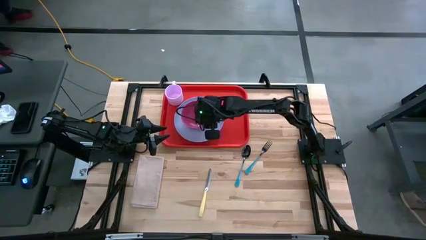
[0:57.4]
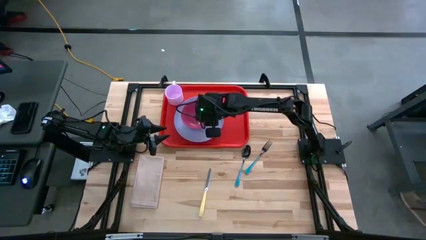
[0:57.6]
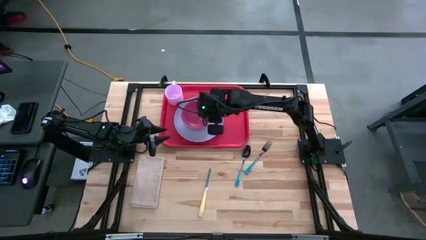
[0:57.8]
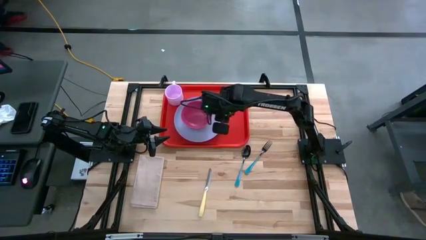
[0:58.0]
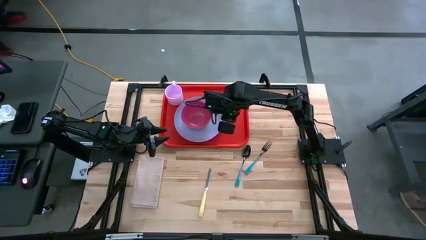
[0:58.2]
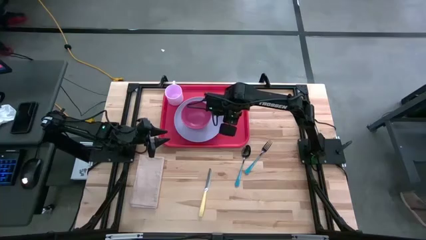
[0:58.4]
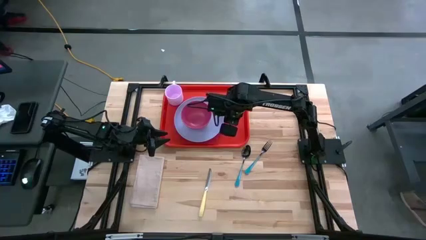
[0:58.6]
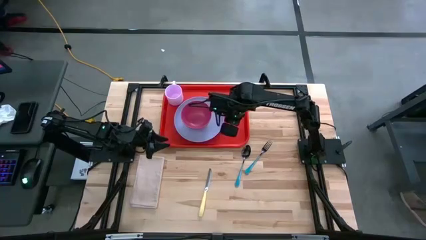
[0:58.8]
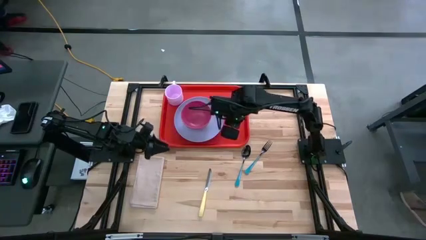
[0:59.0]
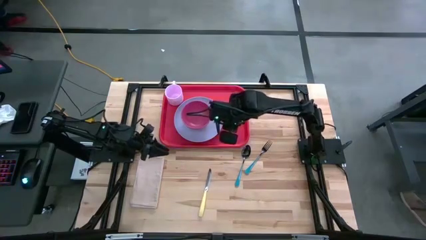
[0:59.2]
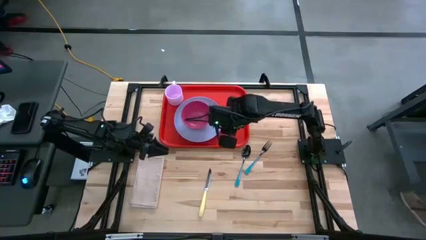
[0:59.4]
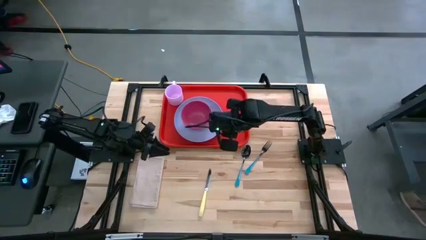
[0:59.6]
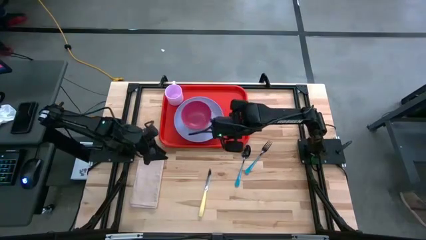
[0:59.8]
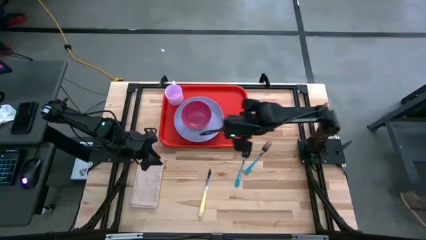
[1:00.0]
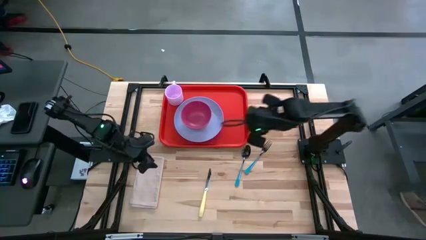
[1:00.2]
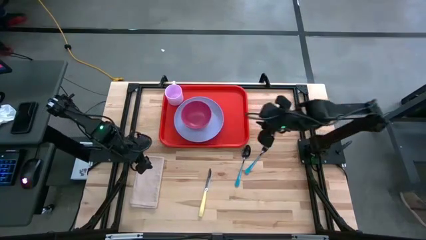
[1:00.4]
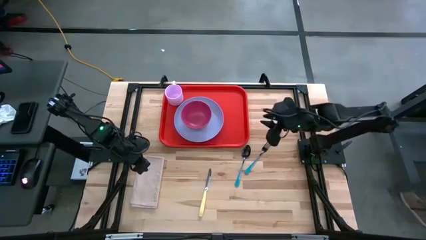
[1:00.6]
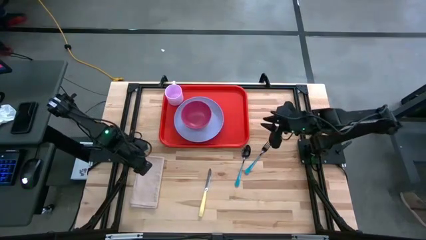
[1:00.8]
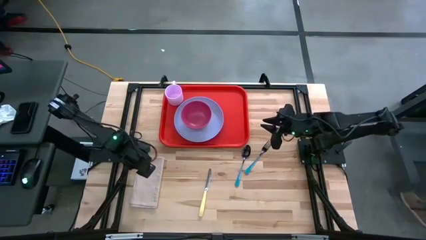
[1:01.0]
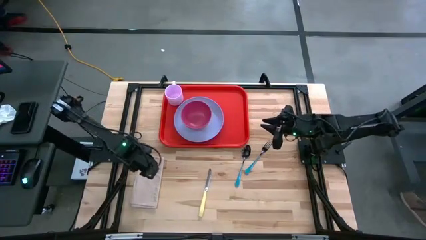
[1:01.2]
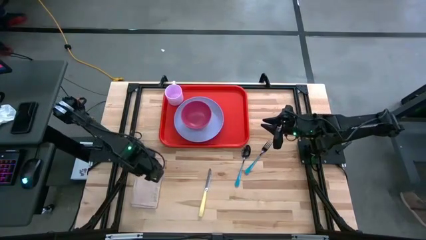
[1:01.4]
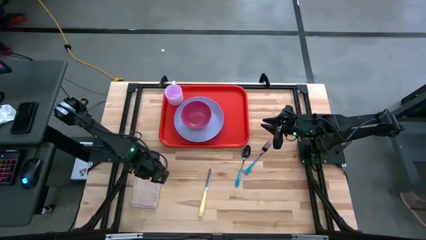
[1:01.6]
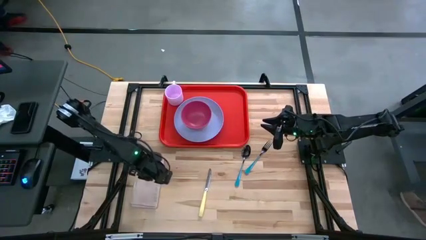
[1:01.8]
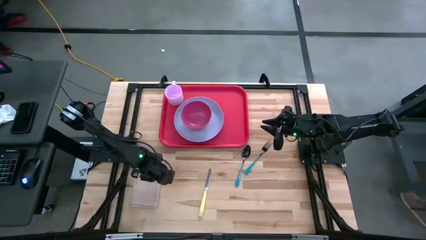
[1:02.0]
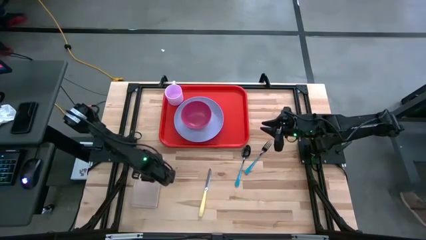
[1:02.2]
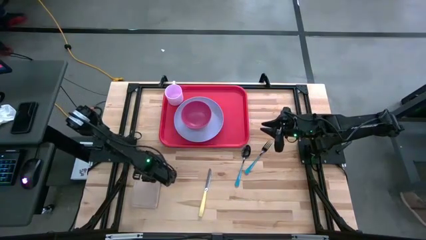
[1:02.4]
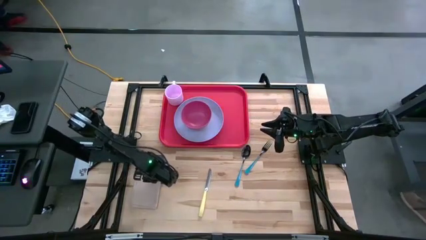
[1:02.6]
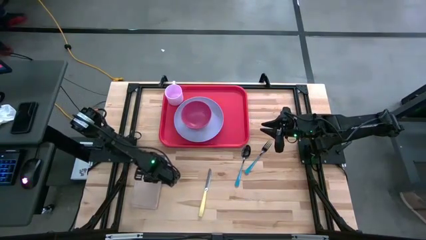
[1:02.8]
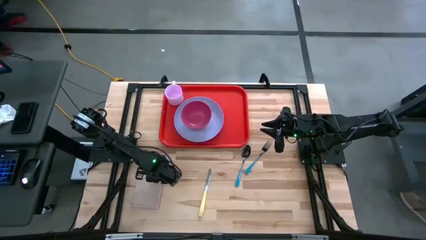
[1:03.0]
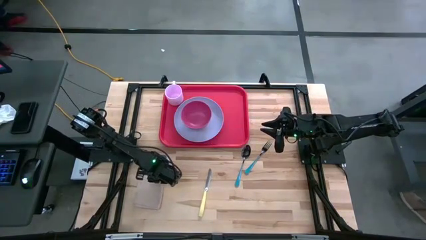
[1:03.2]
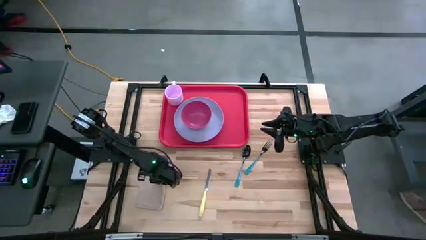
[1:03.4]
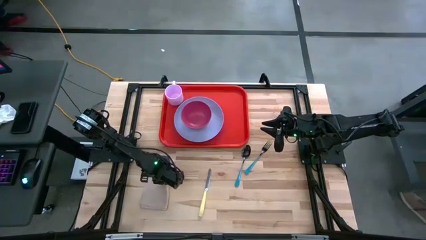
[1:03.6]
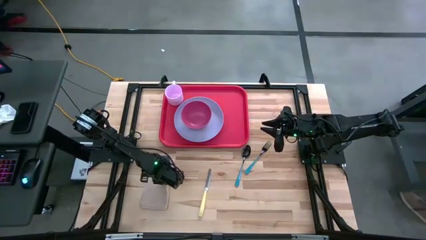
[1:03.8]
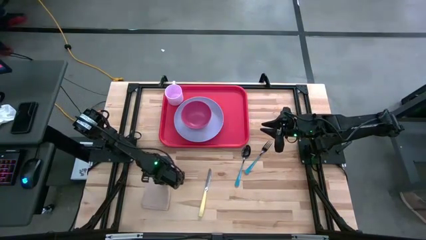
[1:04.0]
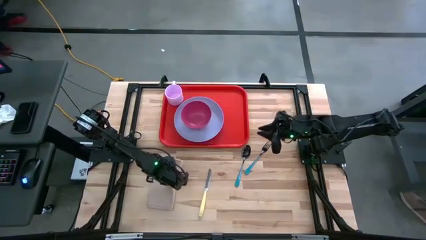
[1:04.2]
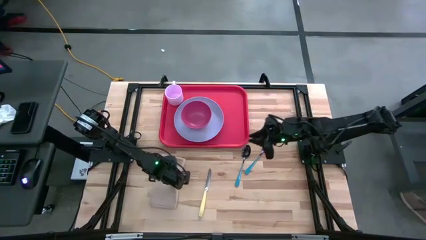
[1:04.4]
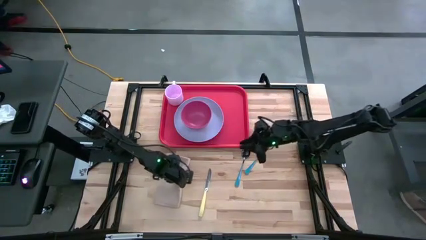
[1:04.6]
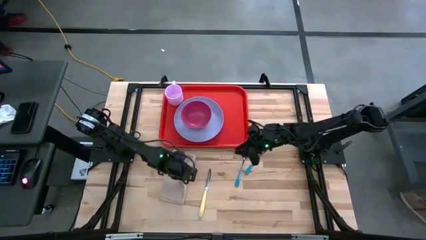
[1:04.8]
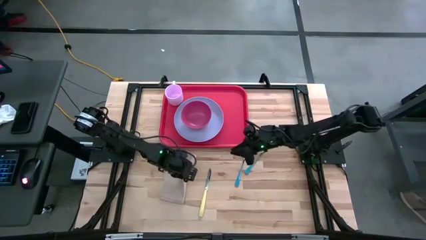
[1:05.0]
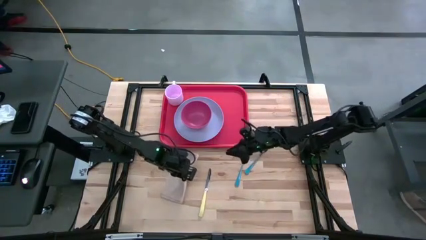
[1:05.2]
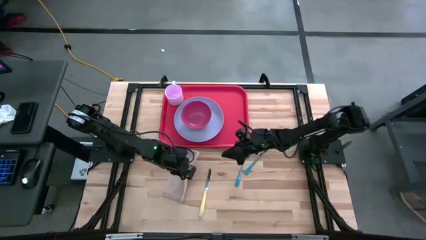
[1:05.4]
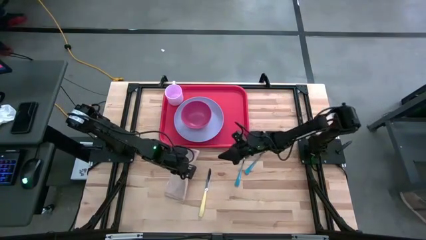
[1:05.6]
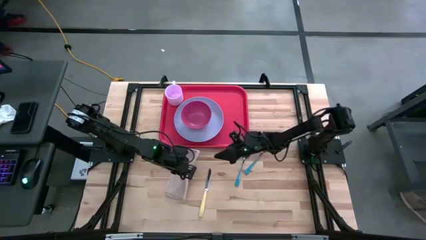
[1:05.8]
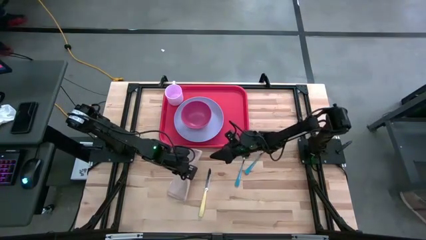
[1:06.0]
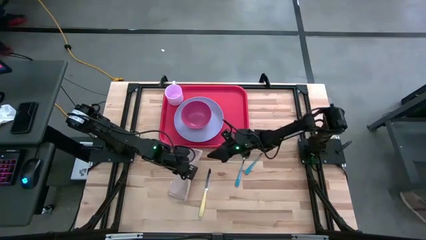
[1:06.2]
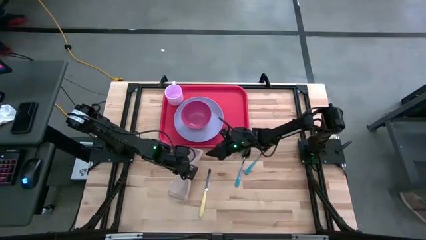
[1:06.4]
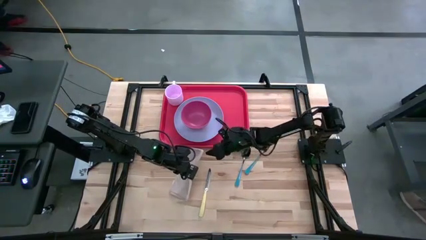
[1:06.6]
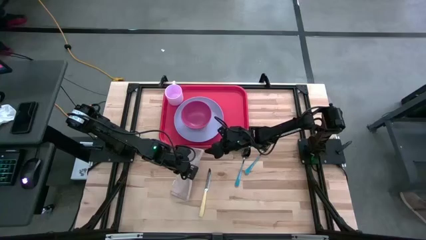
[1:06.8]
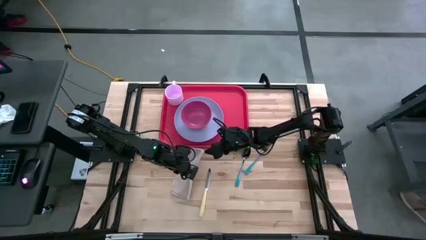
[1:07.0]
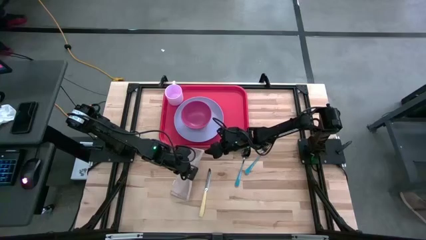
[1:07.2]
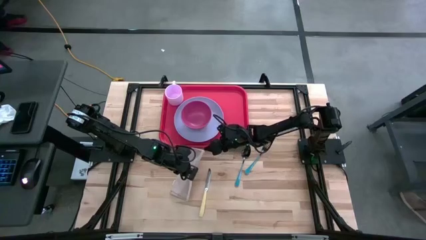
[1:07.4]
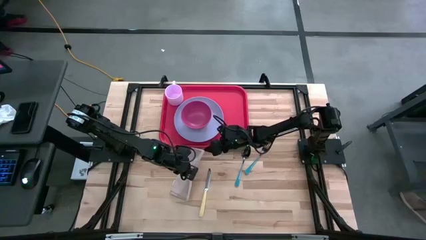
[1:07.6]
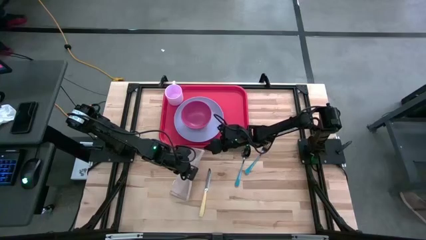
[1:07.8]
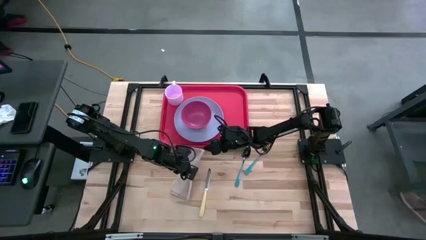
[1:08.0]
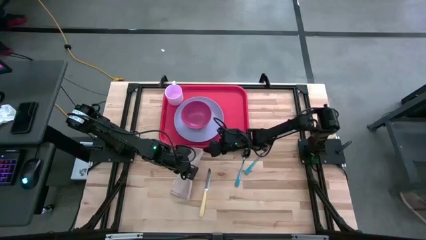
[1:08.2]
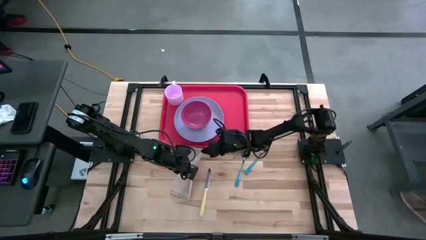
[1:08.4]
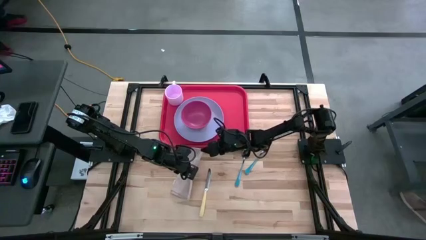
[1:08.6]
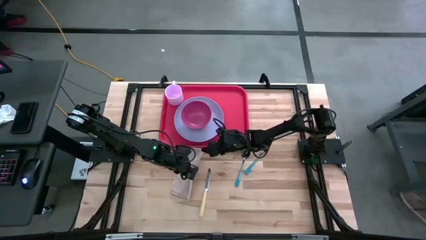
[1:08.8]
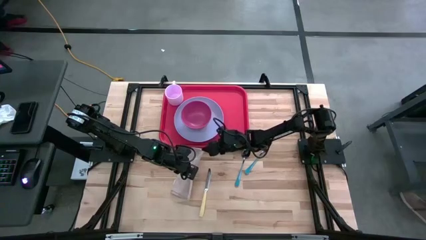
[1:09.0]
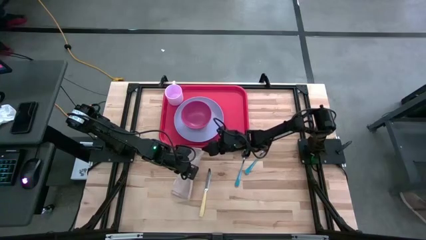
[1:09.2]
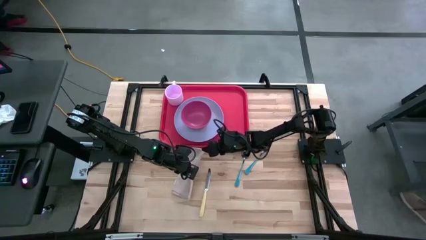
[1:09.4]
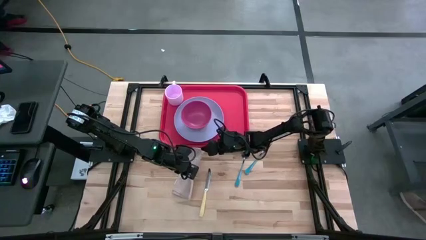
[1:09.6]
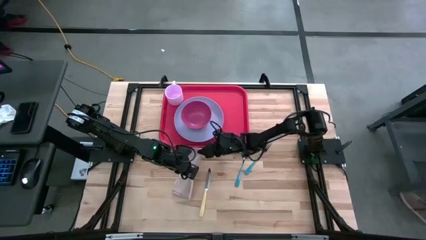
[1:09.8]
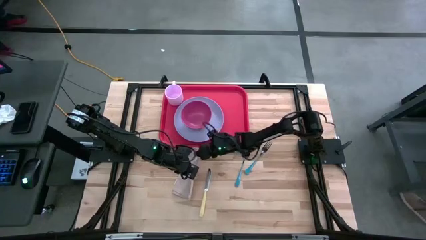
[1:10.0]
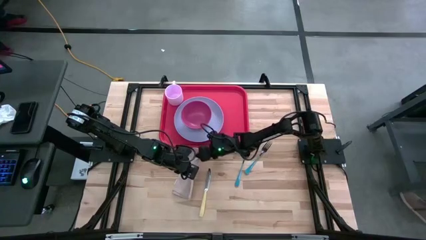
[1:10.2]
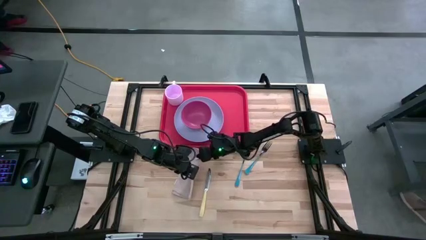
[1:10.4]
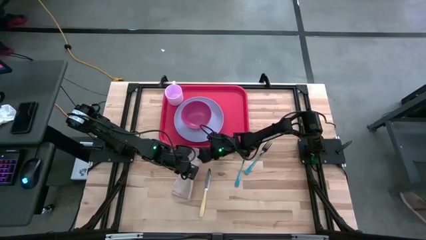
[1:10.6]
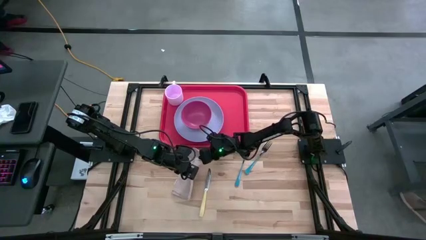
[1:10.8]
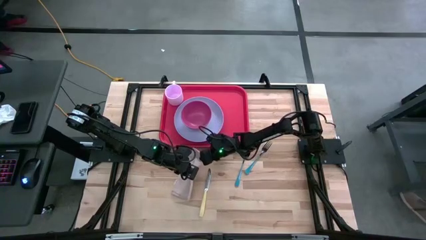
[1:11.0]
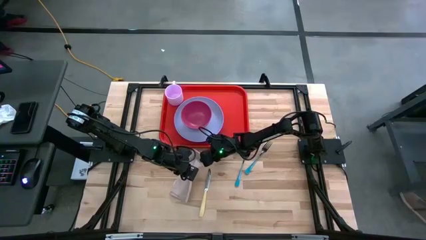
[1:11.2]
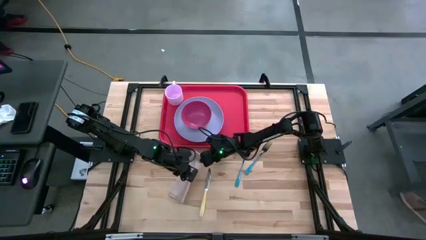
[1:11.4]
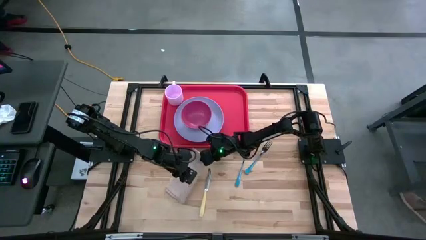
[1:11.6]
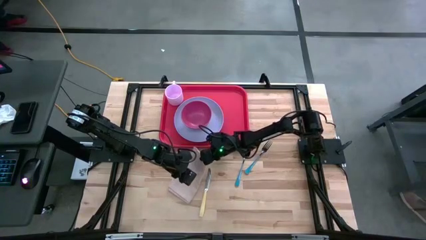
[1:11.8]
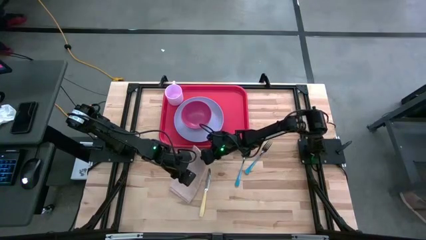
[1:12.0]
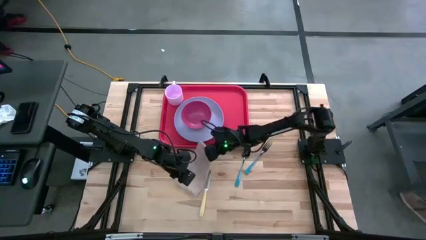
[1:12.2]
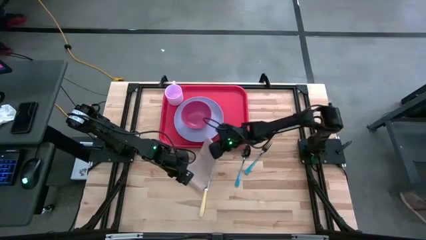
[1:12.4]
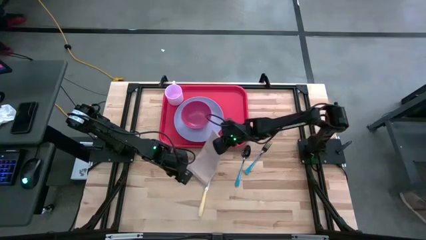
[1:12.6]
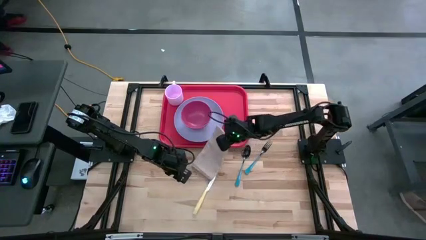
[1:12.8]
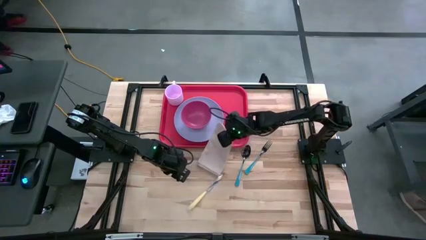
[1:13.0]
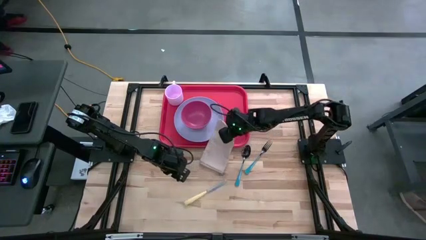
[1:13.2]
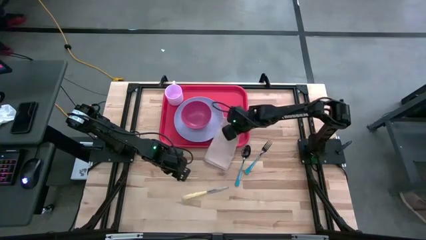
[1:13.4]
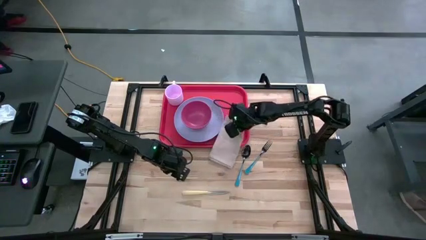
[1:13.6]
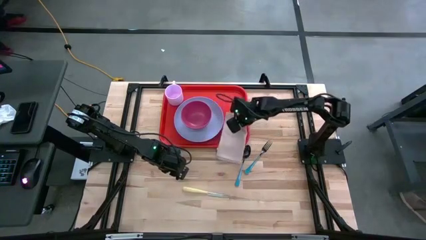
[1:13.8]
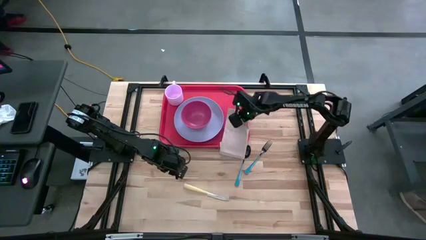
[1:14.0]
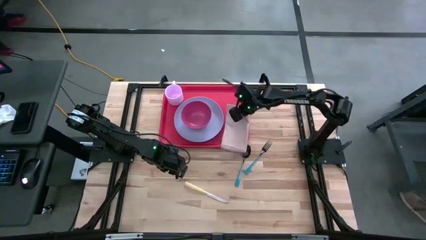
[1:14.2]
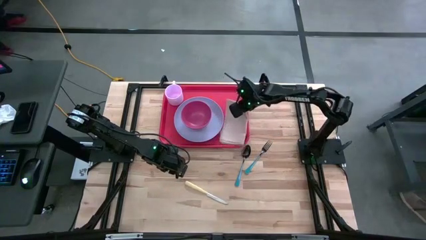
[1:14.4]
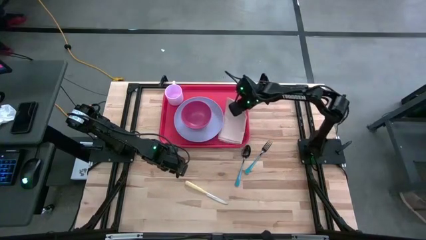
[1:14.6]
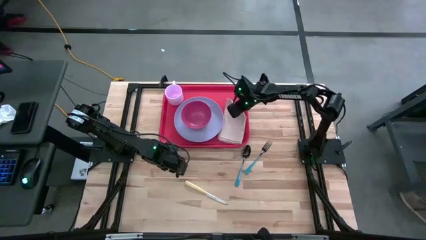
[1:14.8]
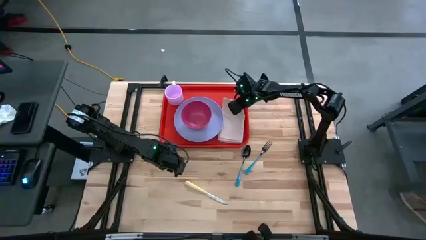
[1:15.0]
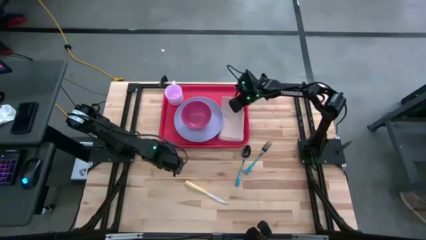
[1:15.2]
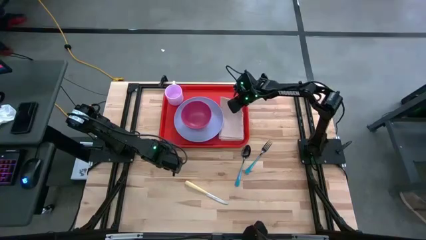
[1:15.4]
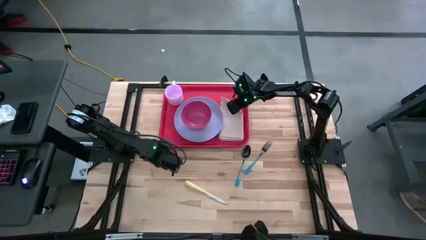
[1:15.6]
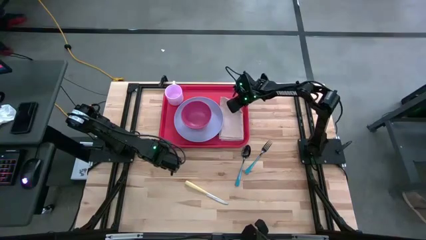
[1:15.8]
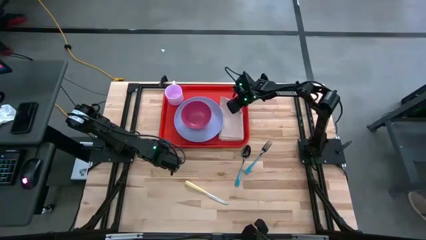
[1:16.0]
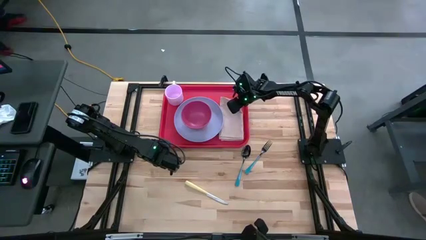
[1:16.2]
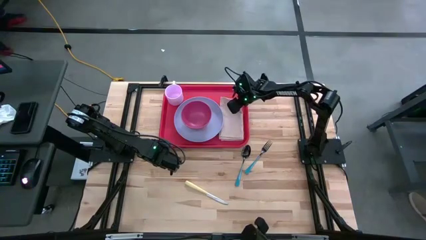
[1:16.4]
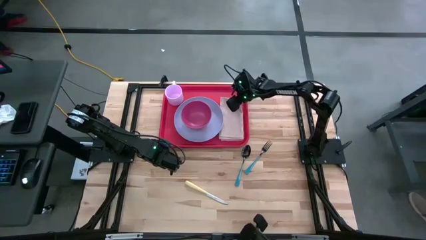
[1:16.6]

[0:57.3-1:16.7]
Task: Set up tray
Put the brown napkin on the red serving tray
